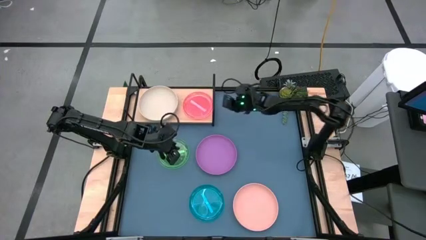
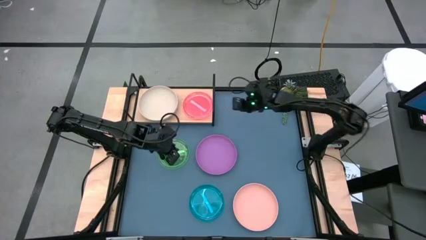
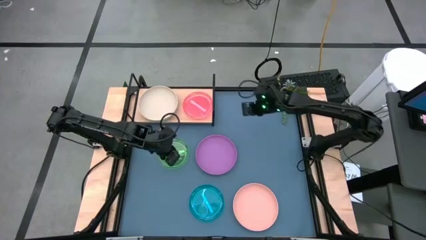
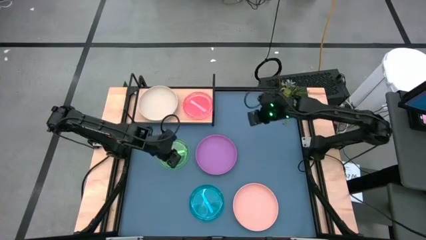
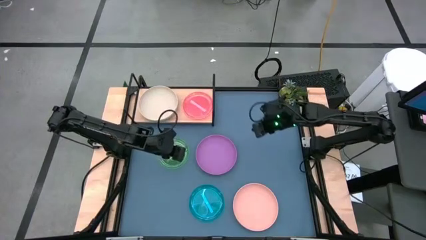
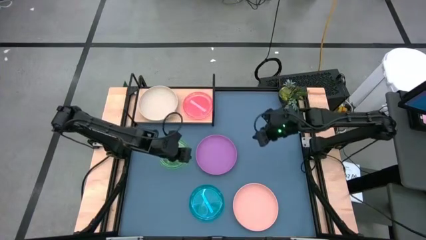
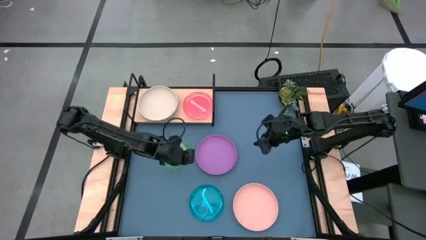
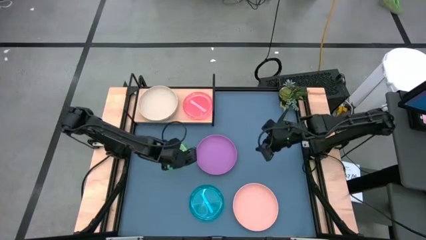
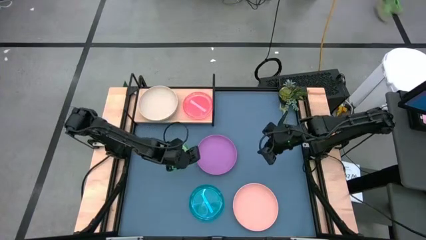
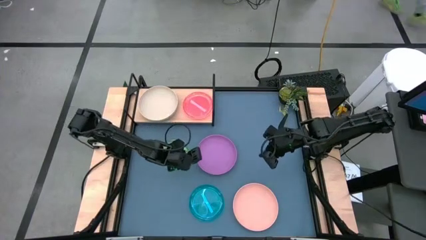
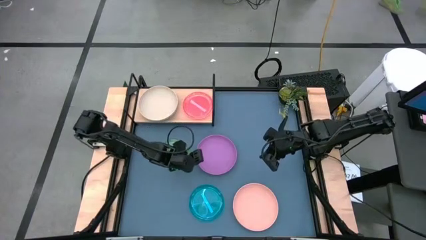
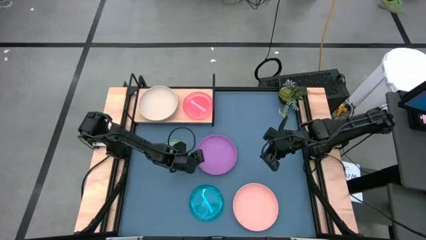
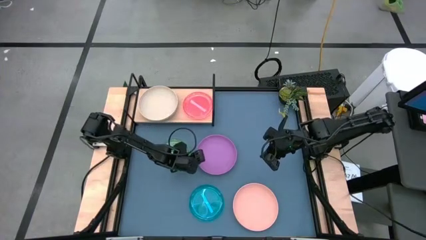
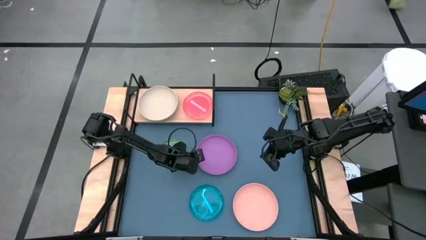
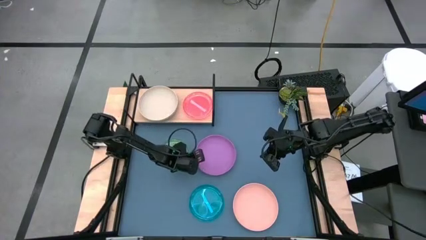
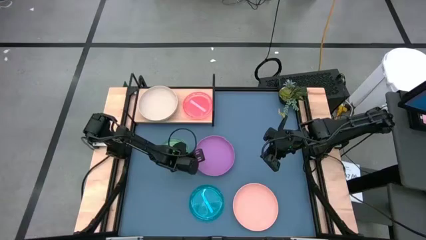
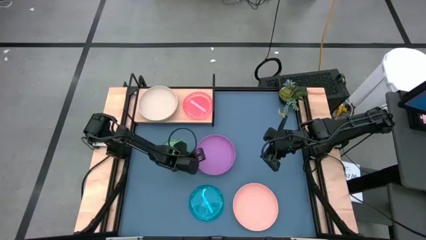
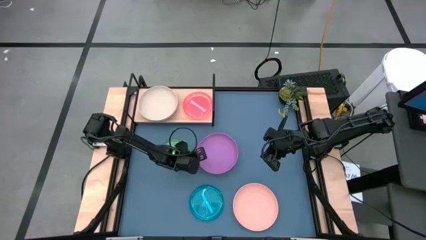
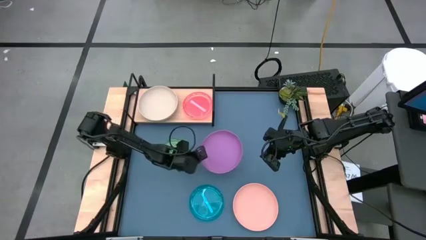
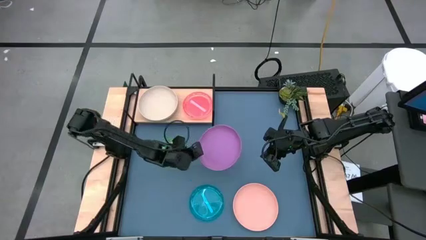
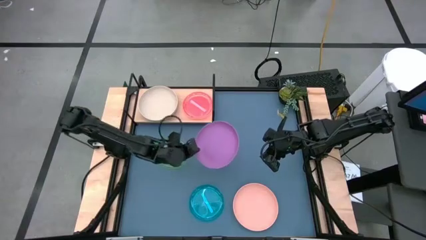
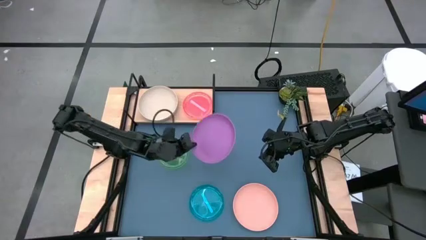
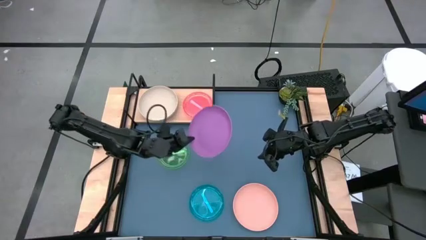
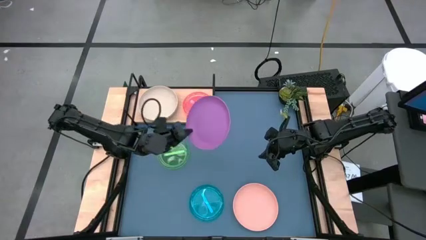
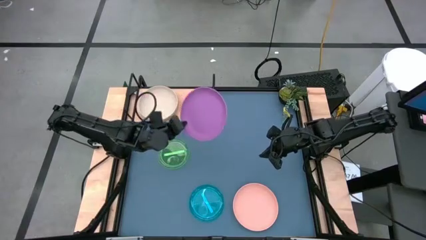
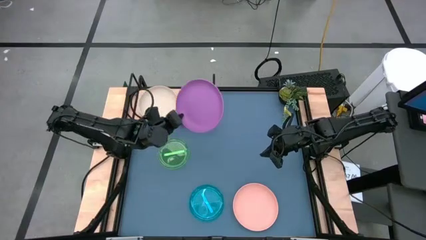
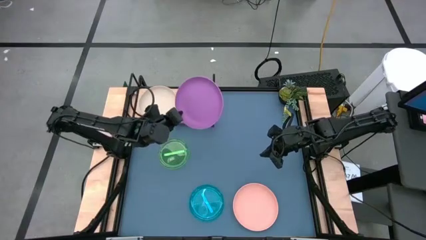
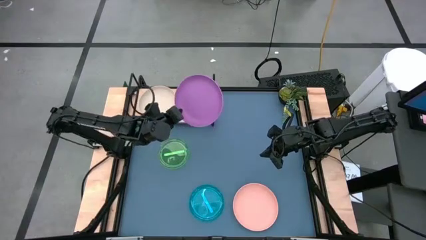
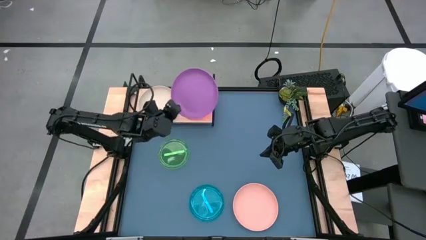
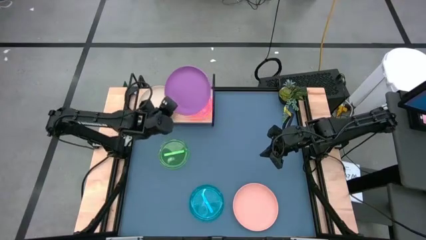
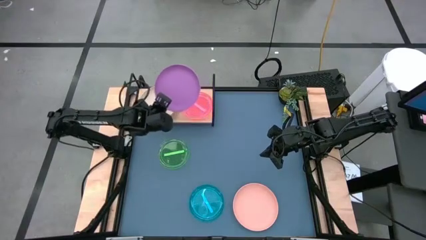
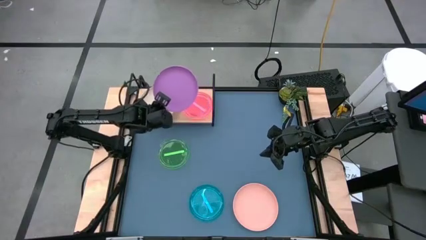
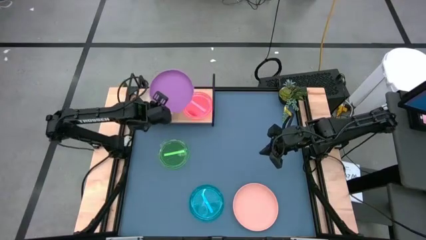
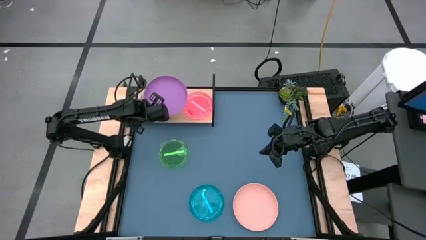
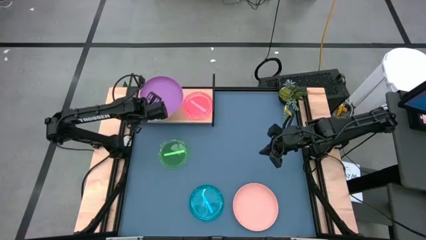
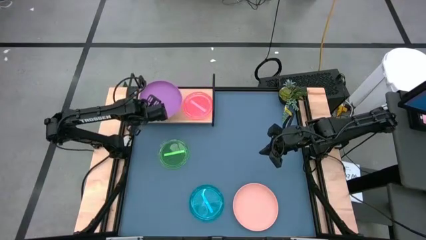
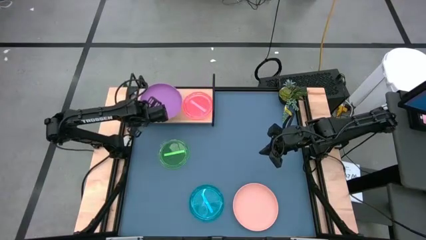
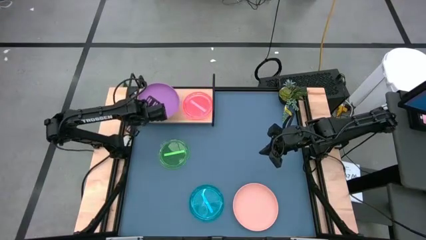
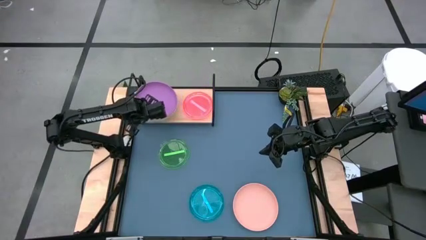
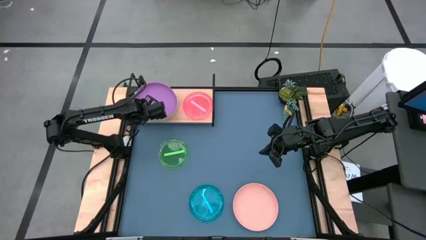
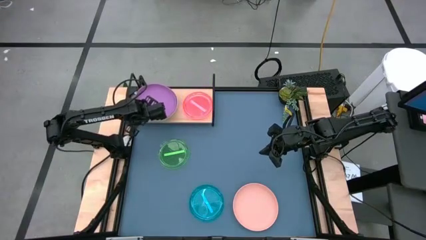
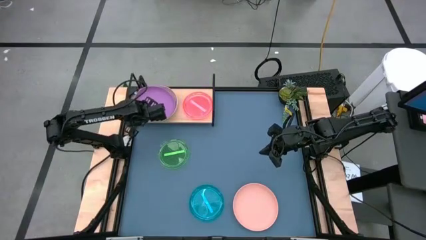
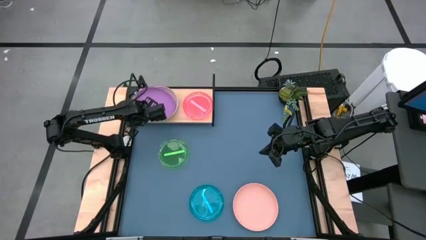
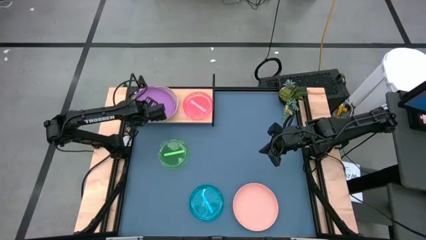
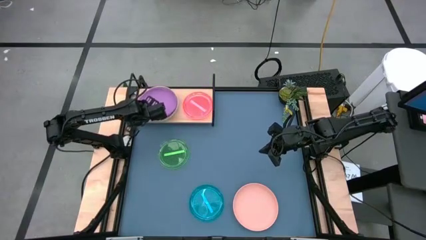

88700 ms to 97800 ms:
Task: Place and stack plates onto a shelf
Stack the violet plate on top of the white plate on the shelf

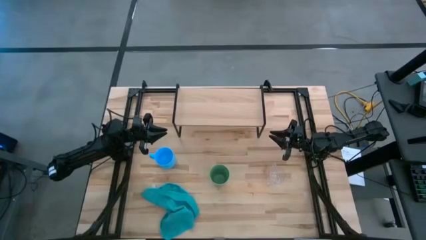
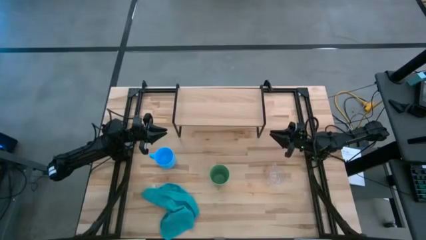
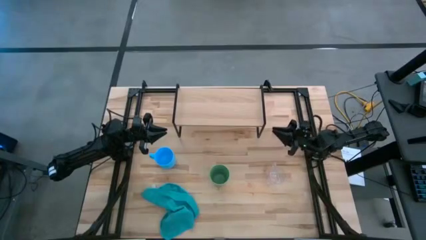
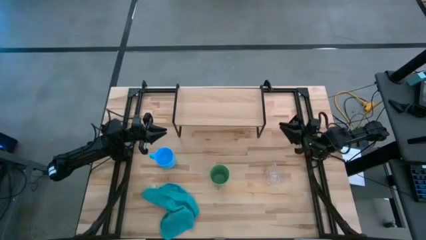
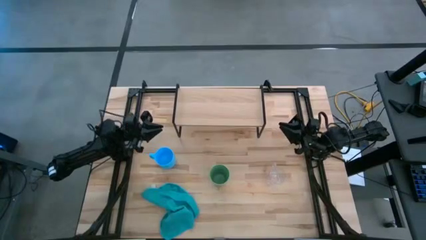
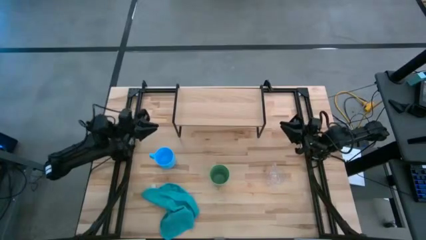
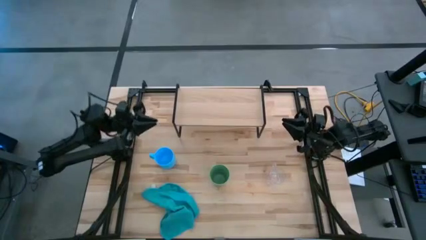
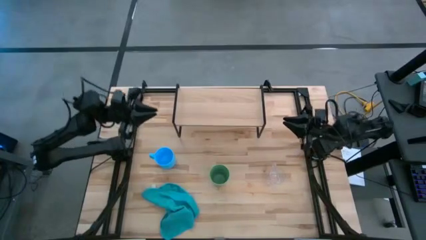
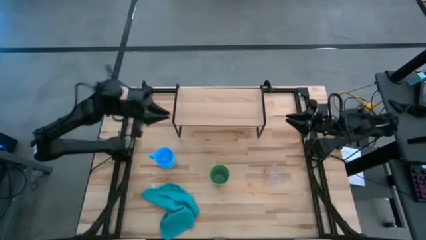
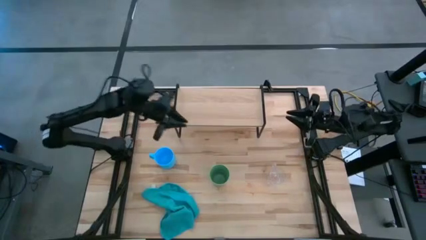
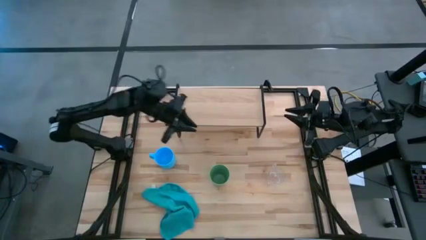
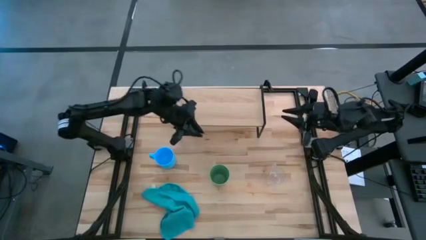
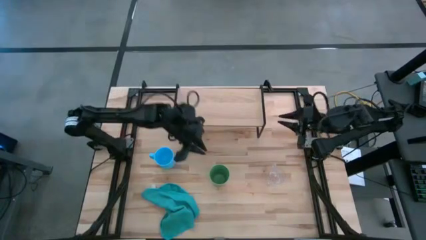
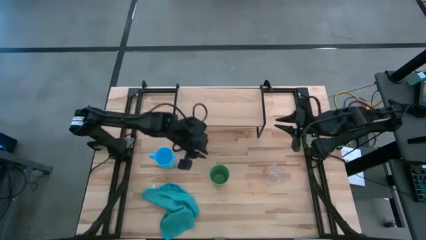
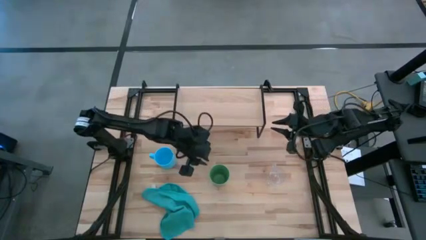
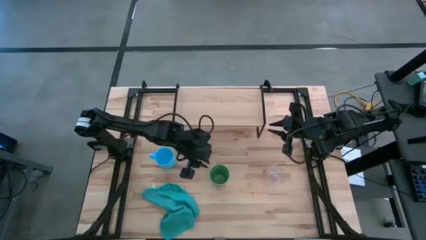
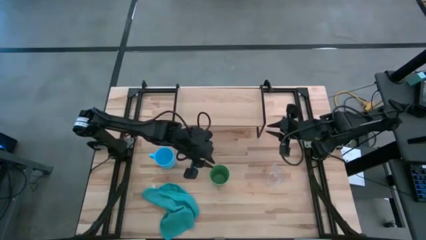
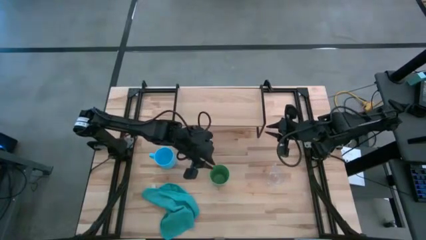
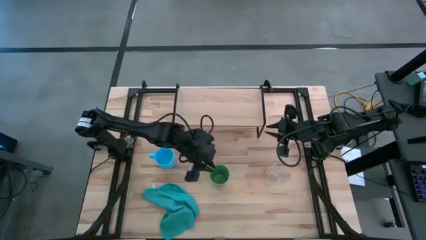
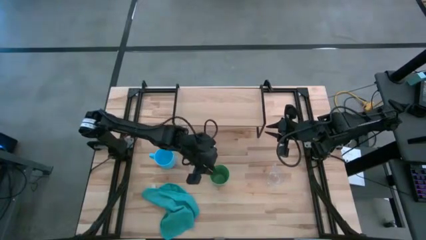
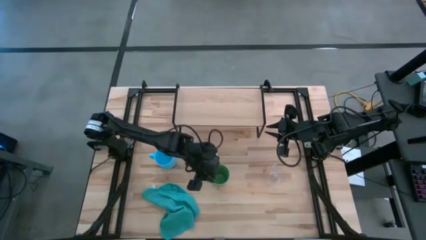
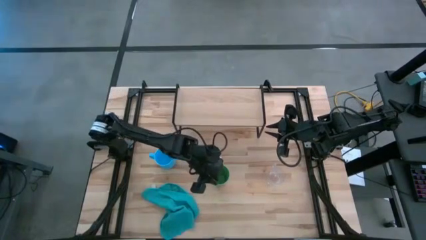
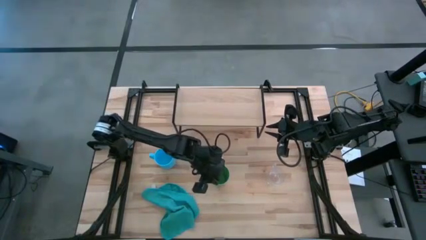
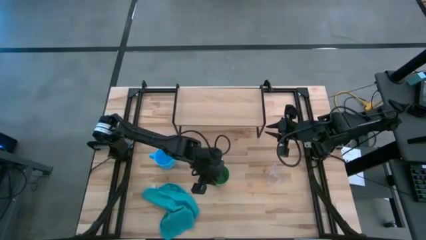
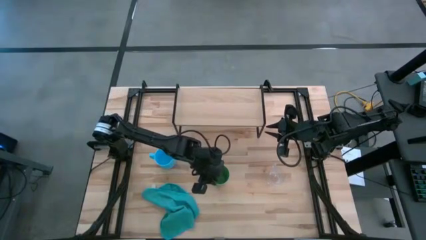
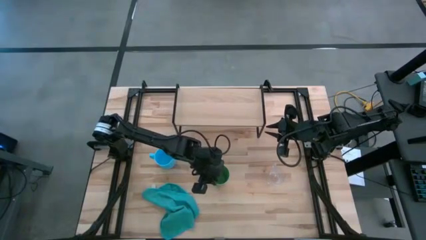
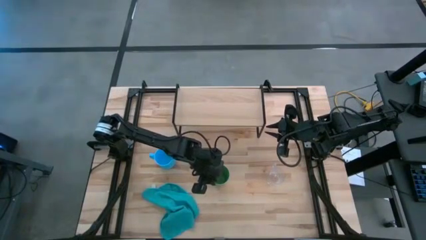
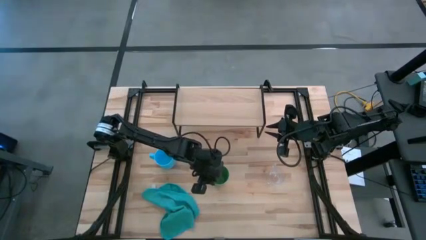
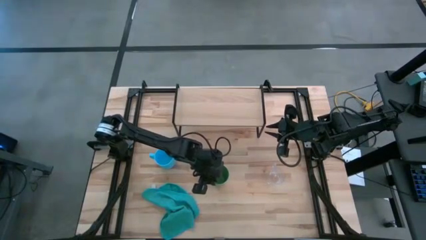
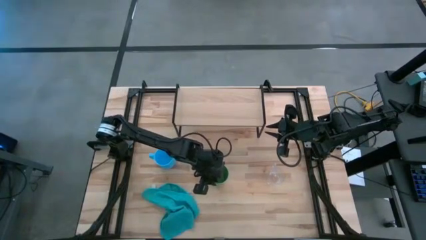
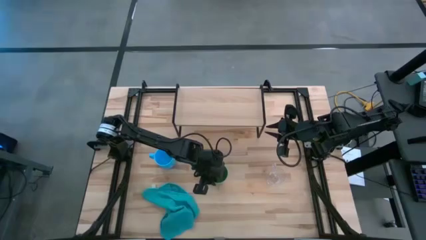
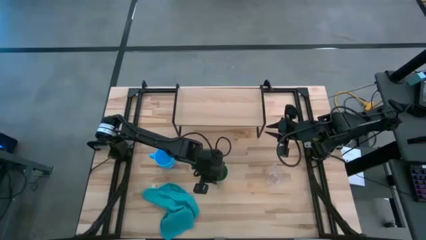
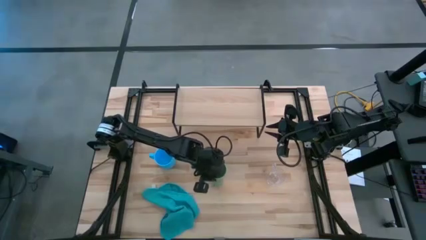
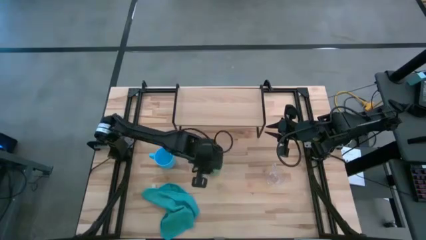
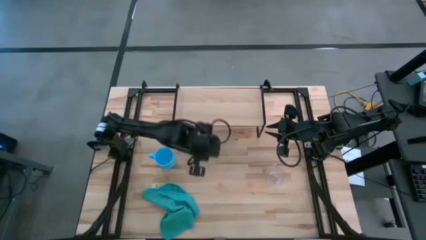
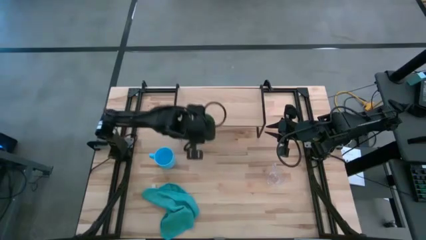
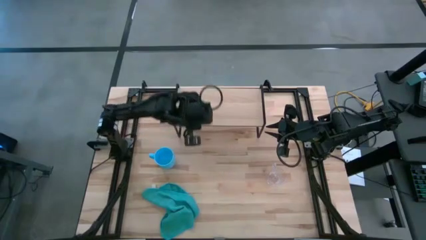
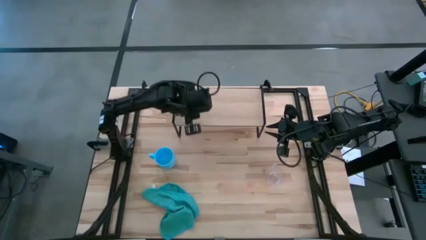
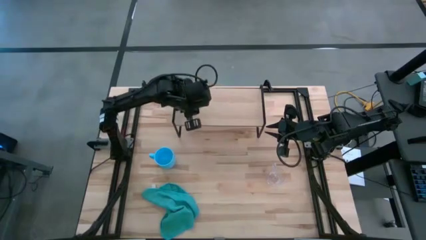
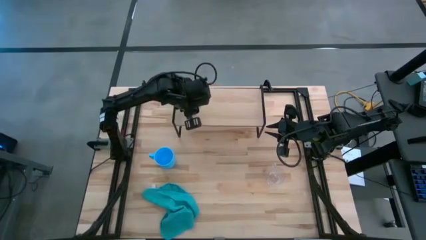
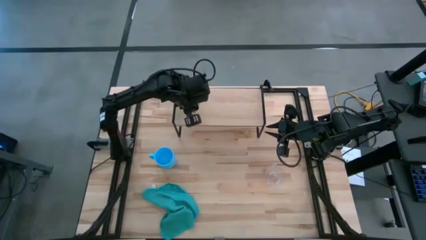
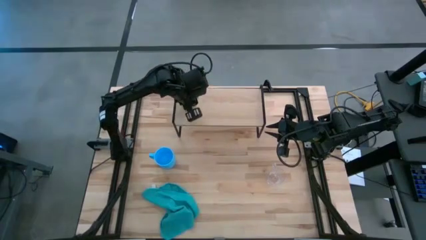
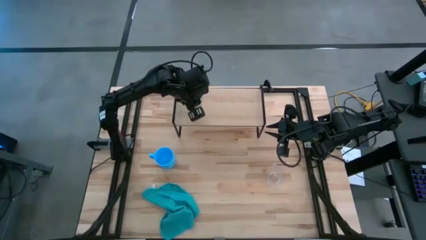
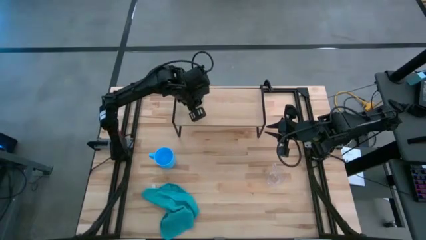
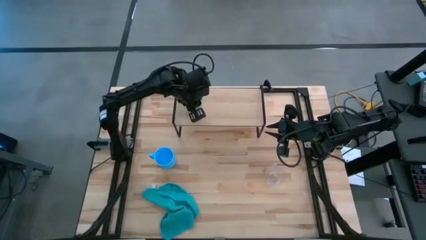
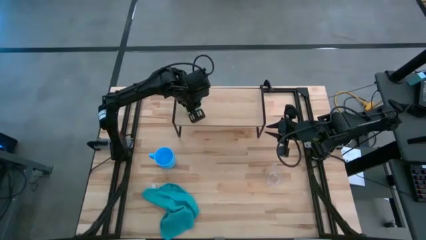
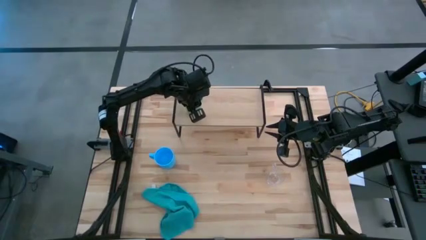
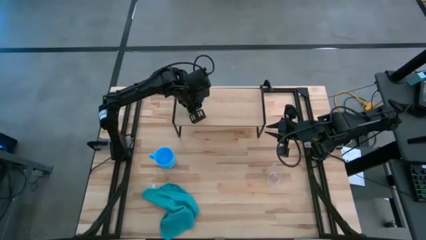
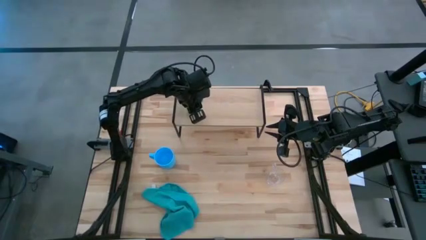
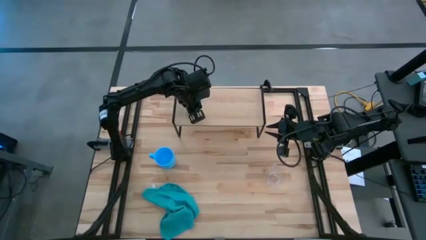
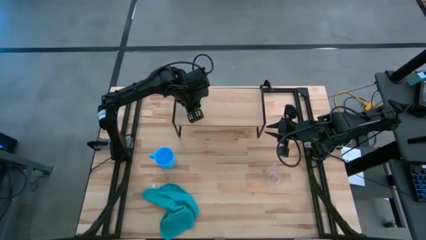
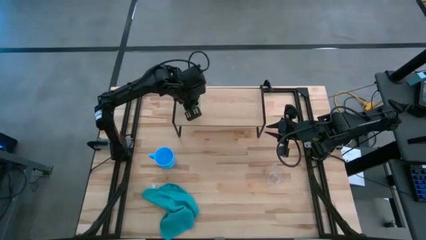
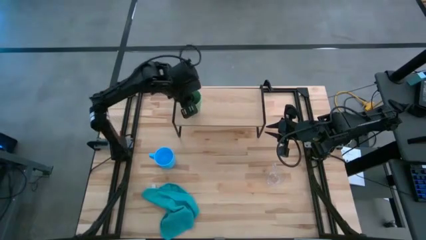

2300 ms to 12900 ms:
Task: Stack small to large cups/mugs on shelf
Put the green cup on the shelf
